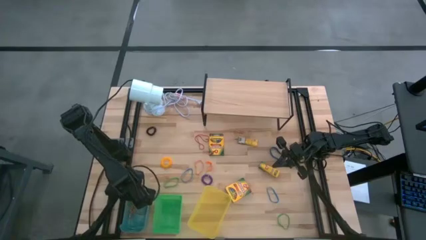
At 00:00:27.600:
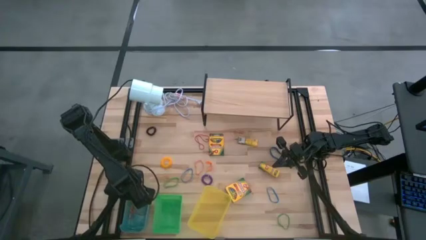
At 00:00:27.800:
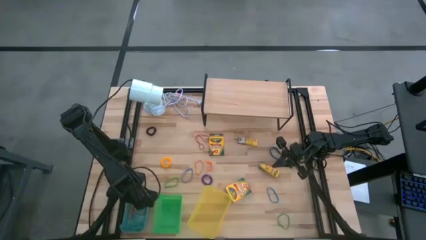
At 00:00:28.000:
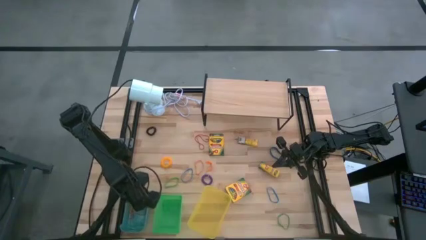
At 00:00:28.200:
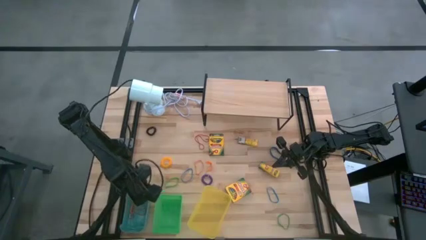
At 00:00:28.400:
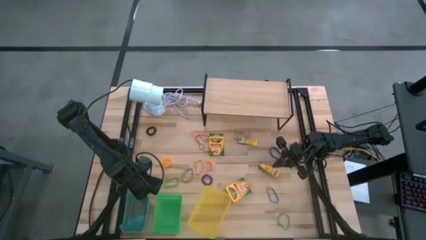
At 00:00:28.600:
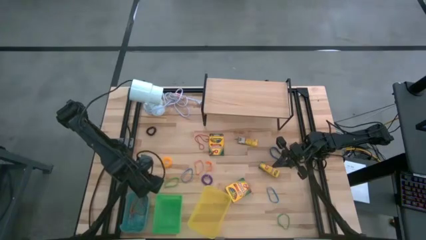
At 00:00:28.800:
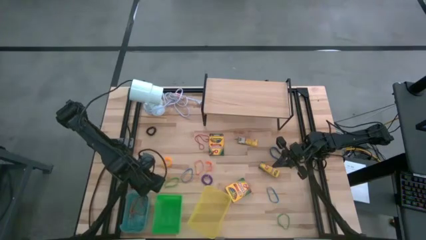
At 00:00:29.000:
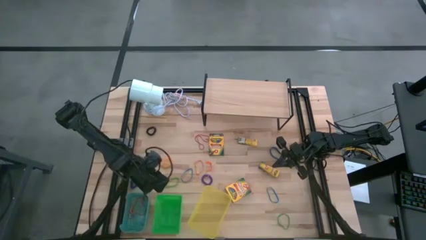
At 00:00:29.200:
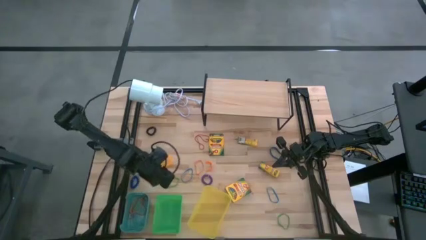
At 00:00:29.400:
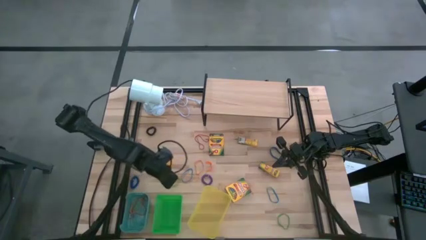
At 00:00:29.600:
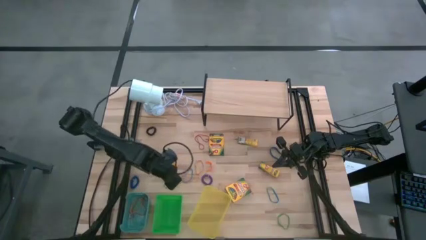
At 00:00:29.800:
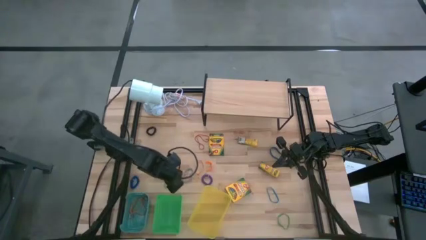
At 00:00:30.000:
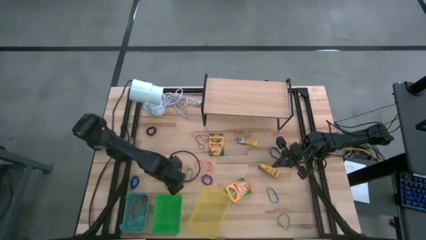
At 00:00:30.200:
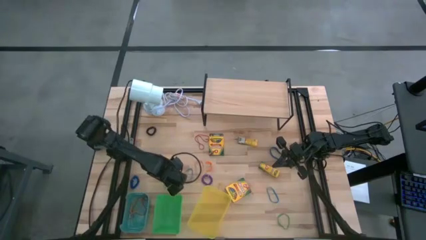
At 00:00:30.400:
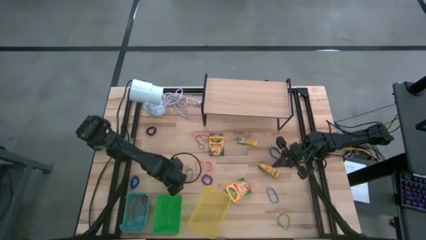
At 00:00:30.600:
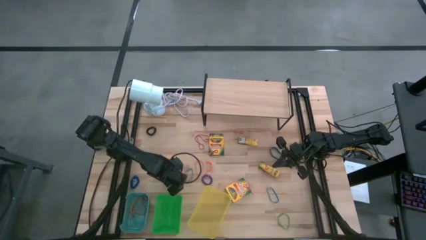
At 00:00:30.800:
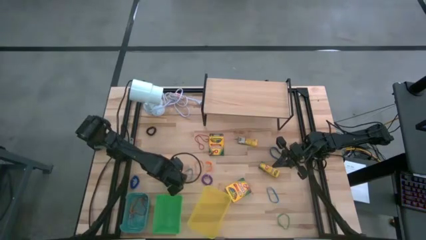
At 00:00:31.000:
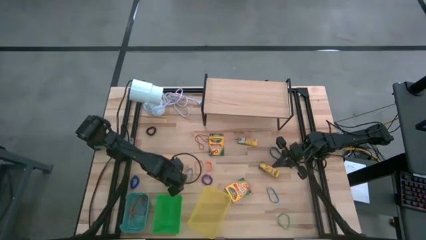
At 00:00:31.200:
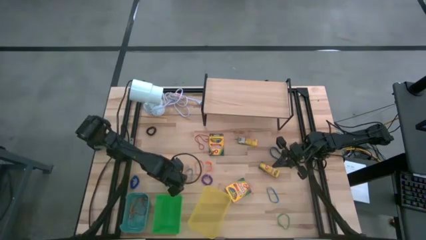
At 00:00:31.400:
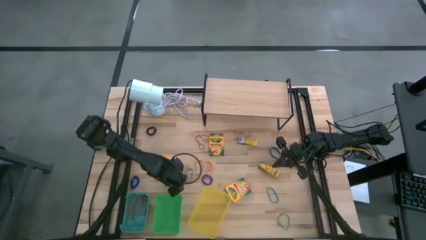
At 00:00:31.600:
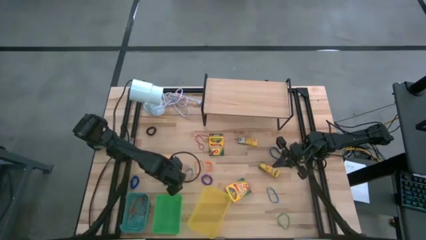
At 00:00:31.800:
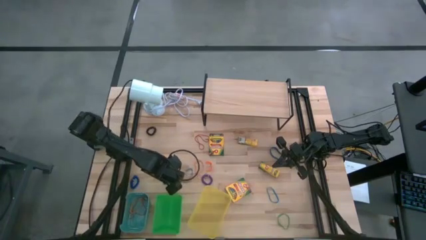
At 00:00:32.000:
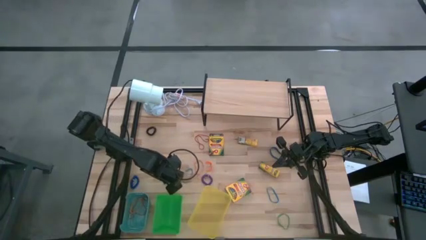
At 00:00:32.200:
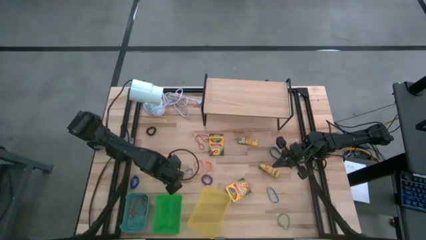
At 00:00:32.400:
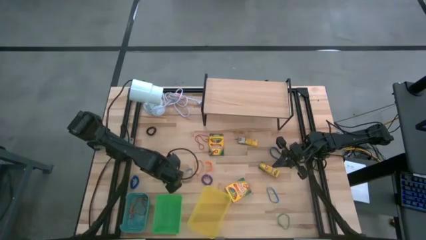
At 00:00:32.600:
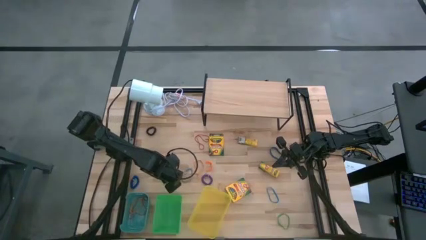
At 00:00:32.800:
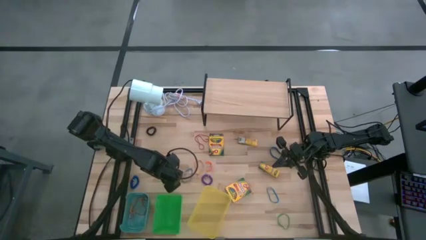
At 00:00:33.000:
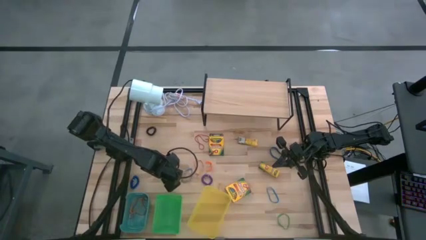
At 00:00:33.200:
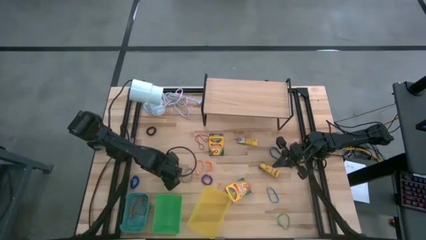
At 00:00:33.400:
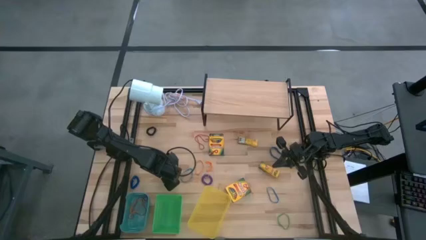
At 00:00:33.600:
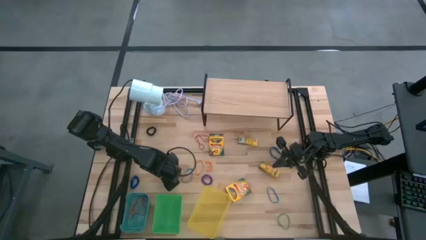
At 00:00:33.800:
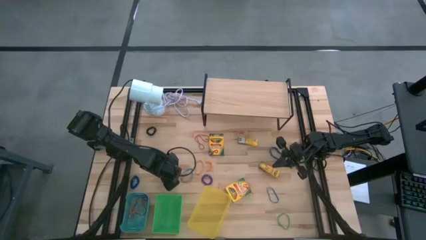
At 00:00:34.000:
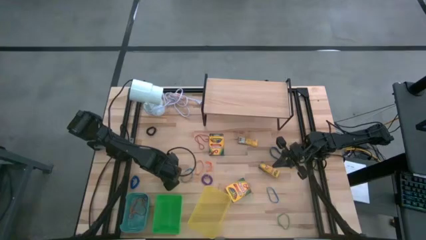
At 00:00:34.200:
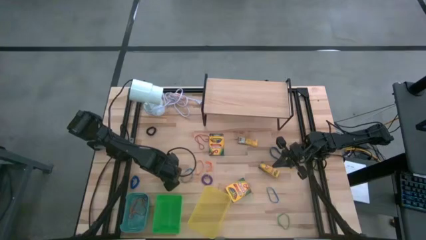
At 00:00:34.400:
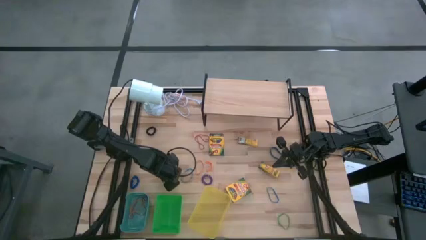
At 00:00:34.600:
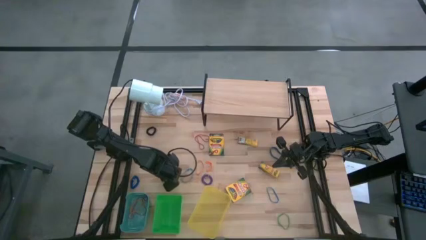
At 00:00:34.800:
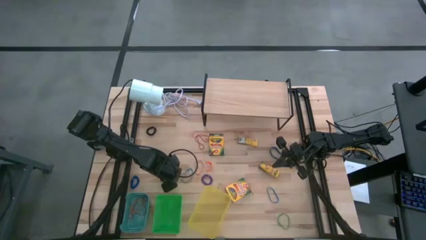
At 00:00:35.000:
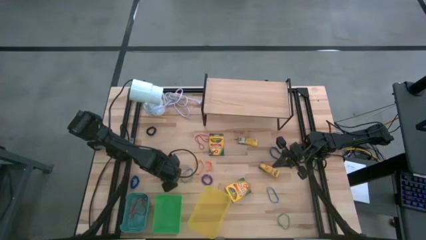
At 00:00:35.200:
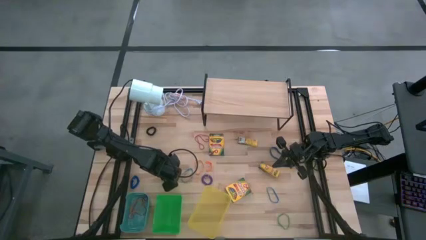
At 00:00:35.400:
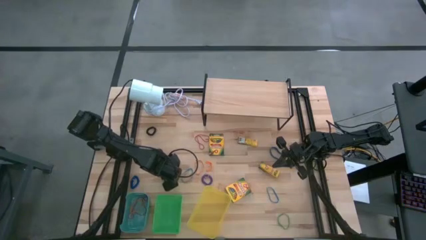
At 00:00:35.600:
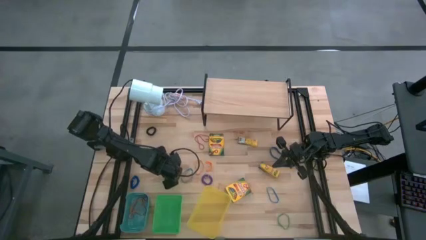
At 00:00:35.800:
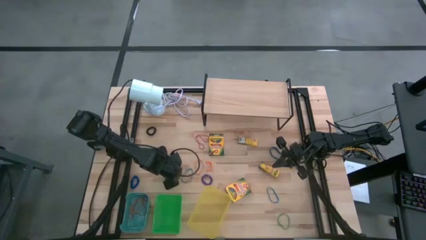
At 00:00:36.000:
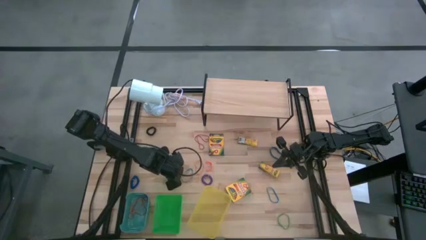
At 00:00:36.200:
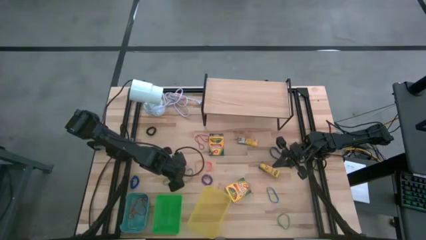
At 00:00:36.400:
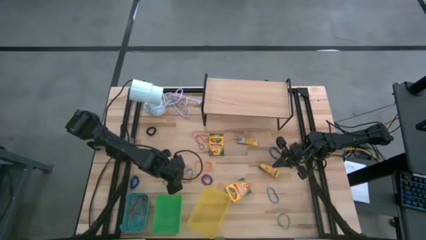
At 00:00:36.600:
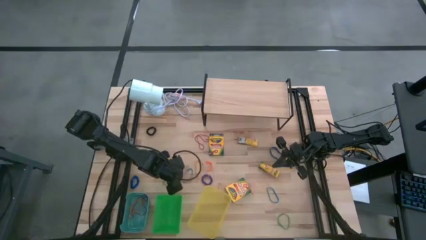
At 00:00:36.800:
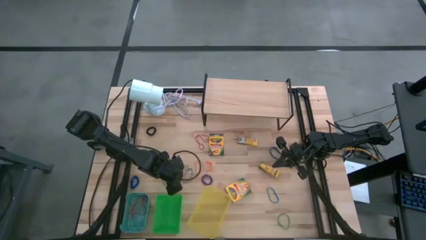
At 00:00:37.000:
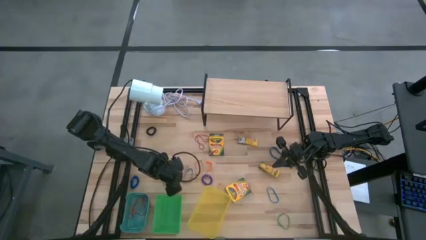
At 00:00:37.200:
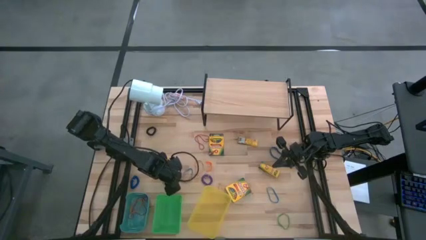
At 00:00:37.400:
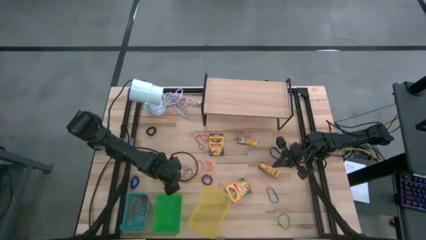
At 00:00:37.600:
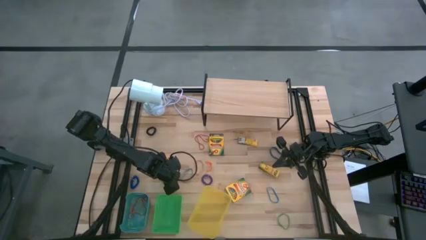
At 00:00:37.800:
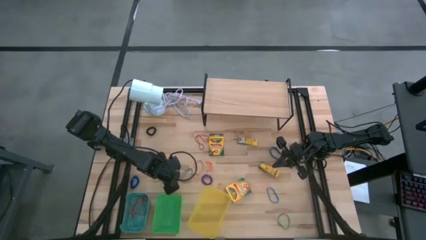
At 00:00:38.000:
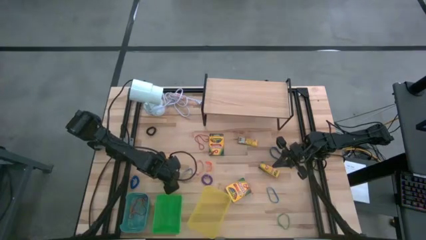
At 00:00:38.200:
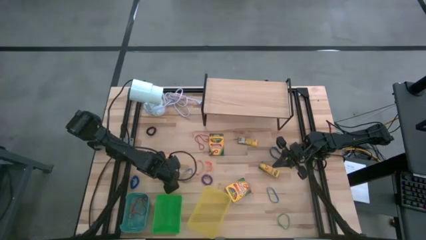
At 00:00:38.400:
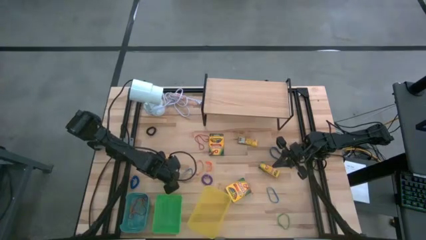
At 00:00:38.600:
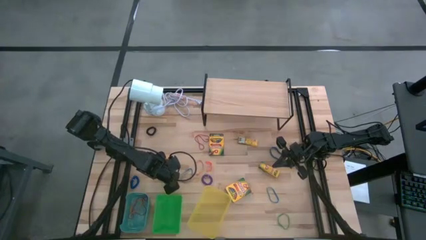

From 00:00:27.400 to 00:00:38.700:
Task: Pick & Place Office Desk Supplies
Put the green rubberband into the blue bin

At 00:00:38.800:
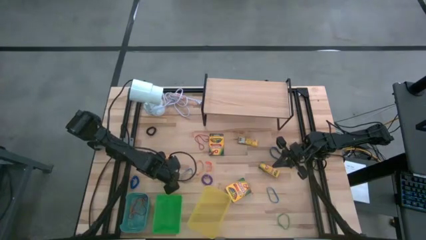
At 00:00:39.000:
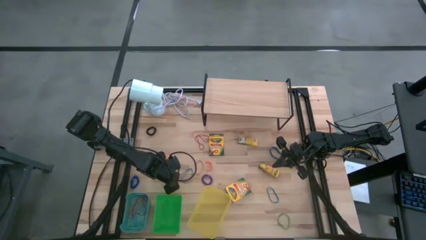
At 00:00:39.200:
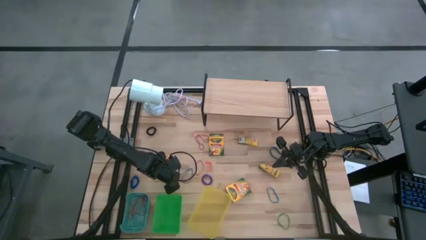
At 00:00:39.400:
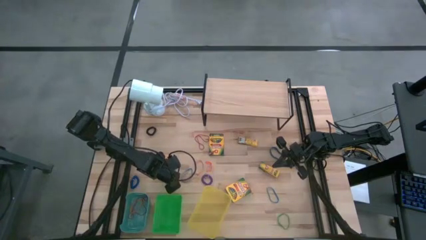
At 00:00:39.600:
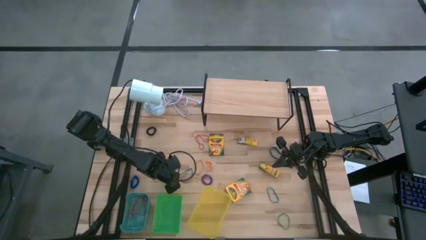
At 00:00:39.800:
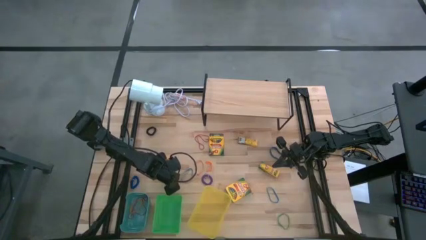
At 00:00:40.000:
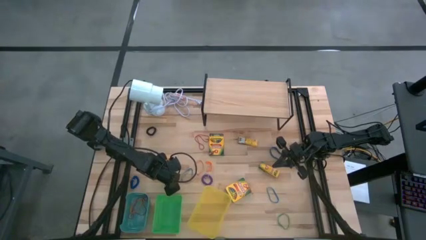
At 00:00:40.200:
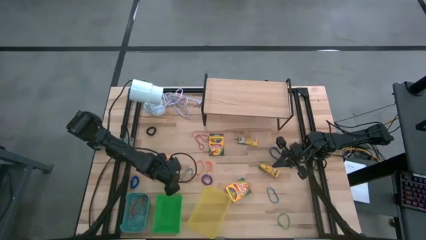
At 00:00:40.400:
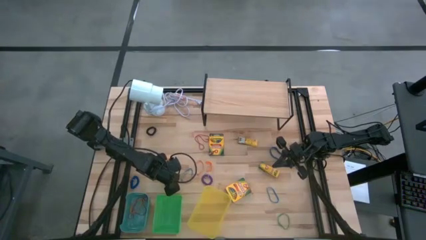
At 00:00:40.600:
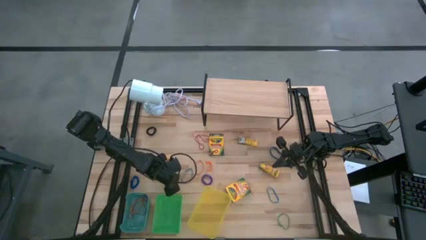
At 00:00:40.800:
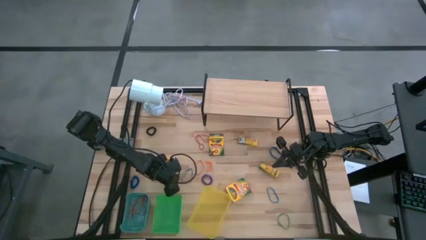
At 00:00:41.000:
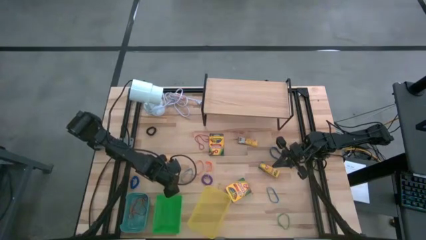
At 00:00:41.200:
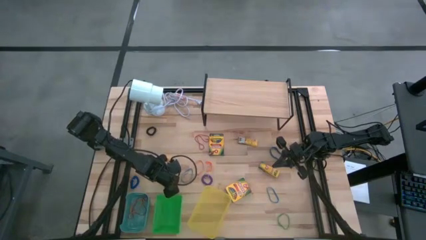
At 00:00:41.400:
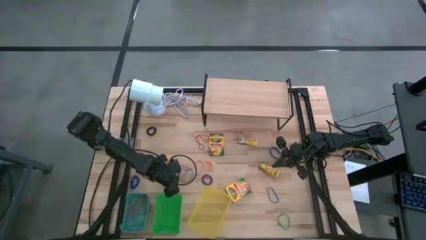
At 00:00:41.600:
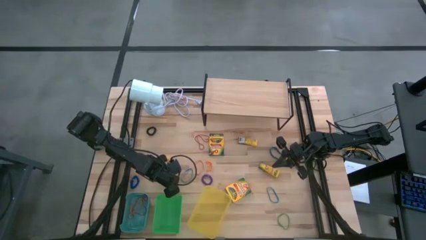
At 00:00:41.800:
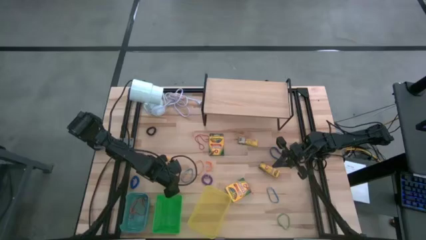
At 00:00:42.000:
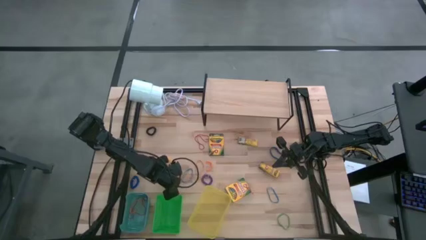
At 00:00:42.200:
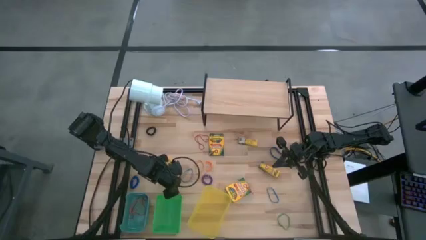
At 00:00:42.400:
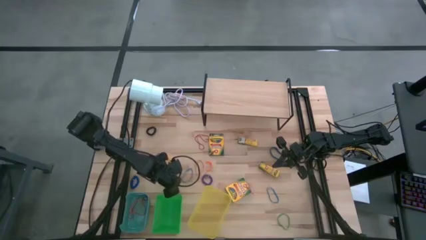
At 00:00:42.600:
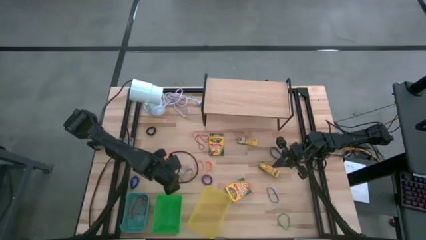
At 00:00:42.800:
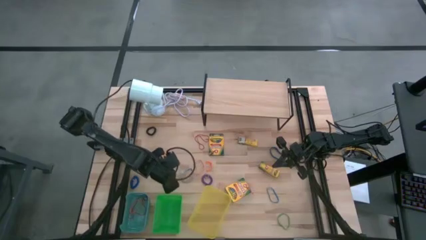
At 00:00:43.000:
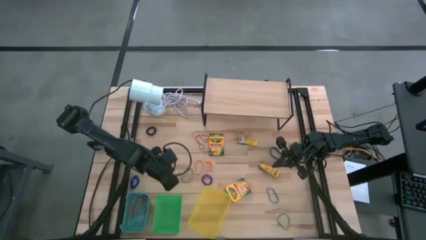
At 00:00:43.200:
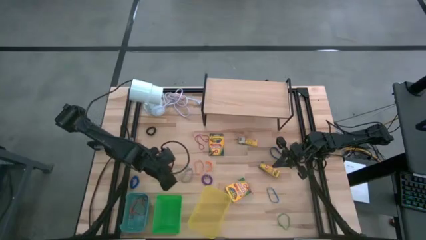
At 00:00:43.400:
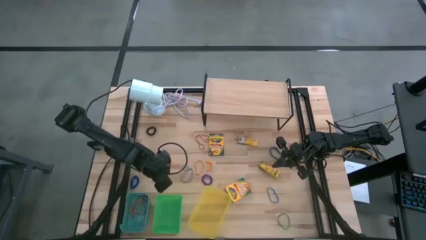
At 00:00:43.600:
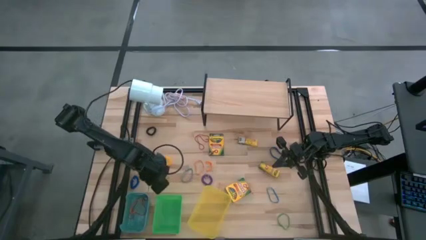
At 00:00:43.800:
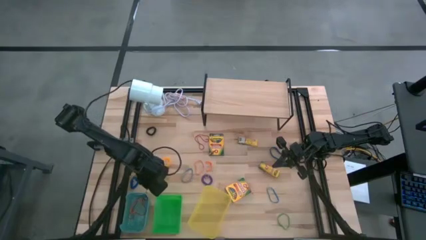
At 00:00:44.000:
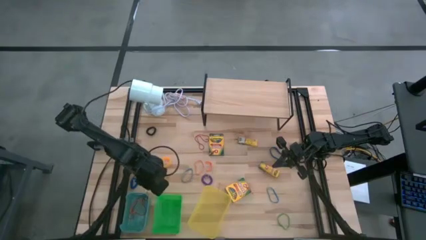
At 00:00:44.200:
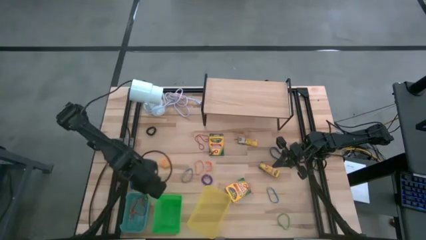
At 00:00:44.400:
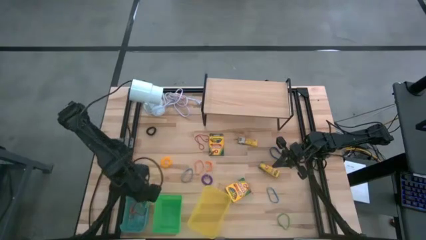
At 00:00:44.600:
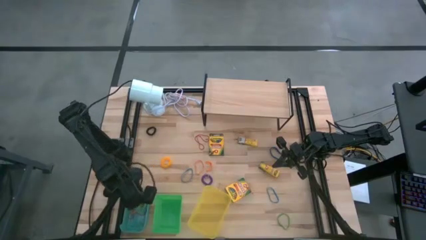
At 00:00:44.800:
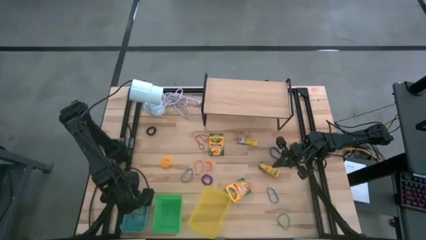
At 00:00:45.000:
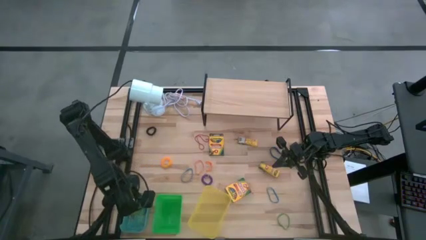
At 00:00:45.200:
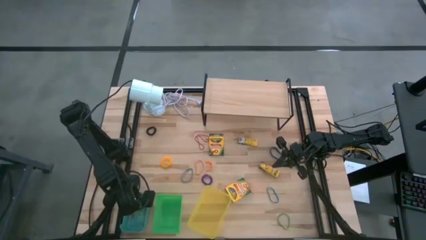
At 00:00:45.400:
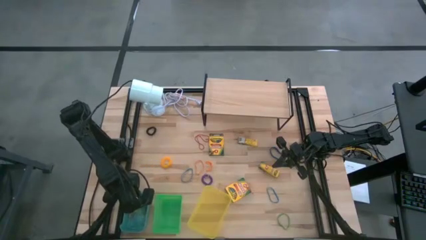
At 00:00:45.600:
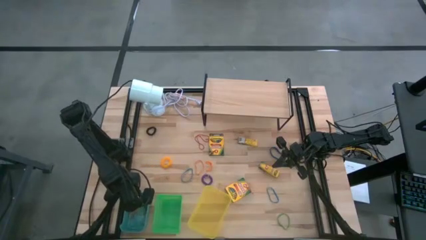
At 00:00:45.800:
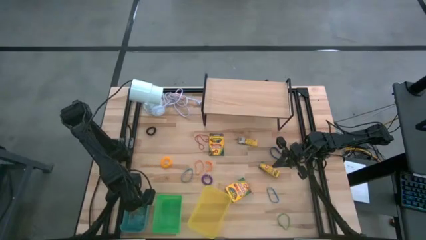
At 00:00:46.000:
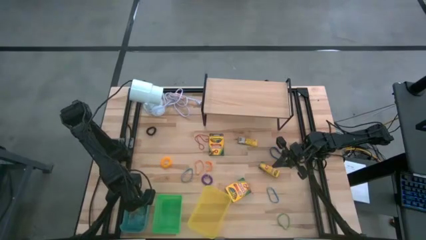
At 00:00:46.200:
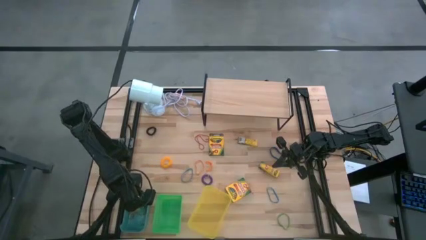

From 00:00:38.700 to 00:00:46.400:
Put the green rubberband into the blue bin
